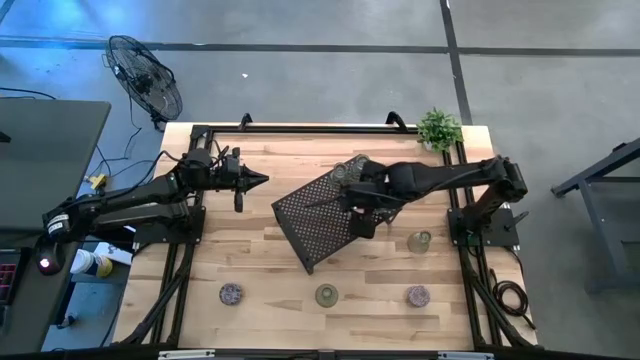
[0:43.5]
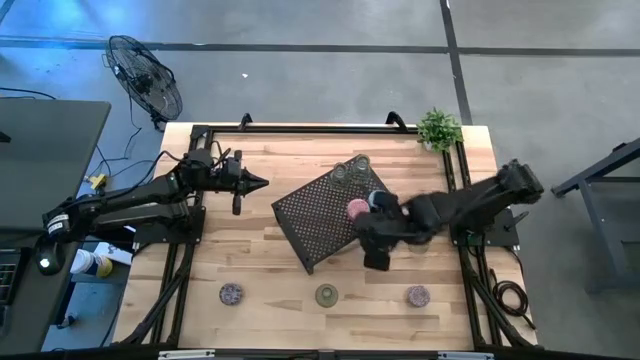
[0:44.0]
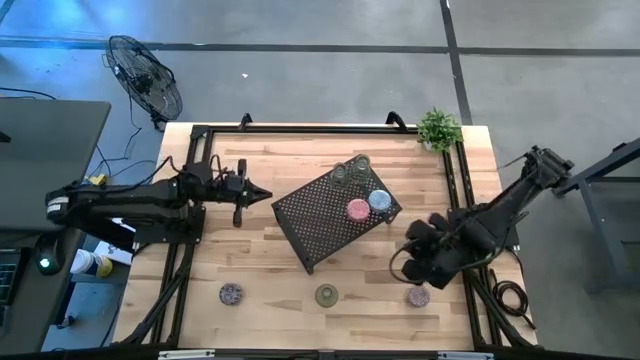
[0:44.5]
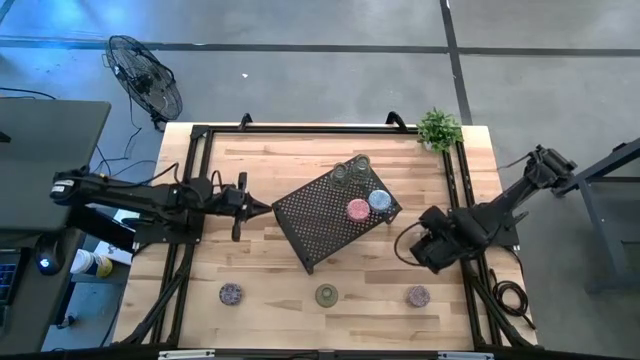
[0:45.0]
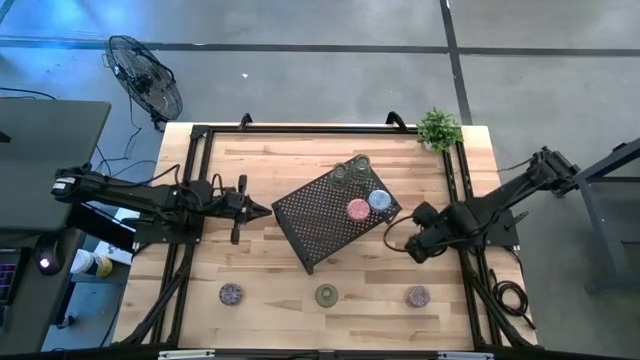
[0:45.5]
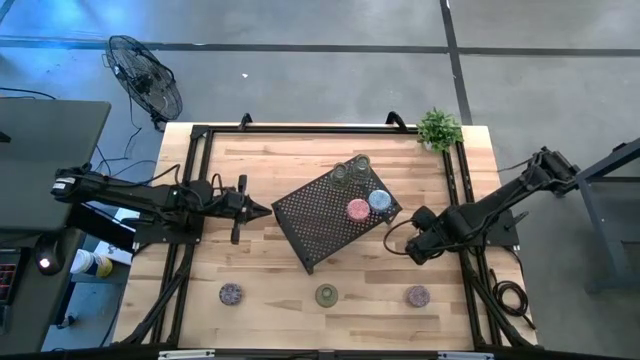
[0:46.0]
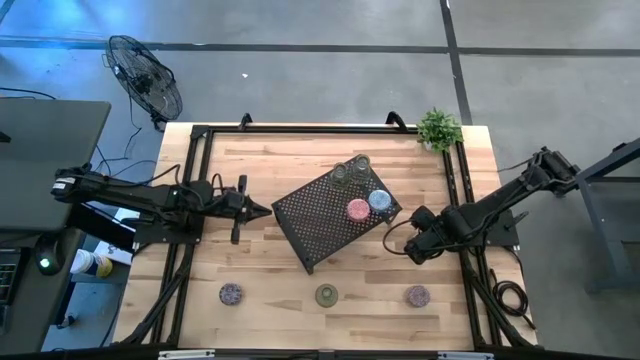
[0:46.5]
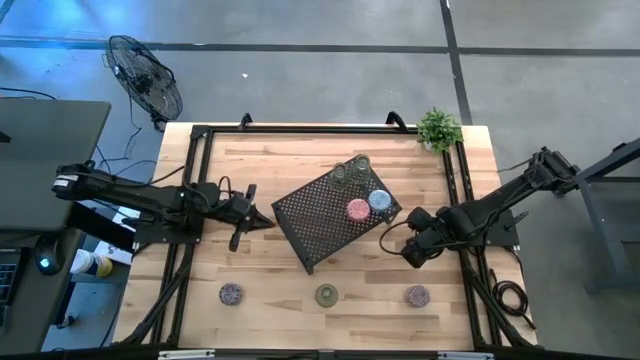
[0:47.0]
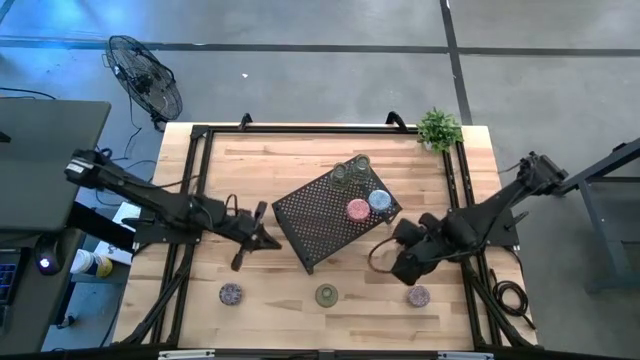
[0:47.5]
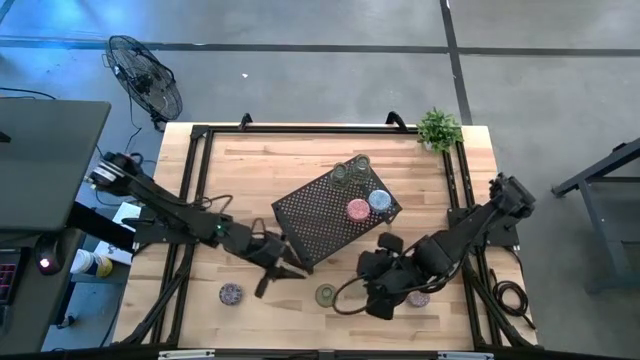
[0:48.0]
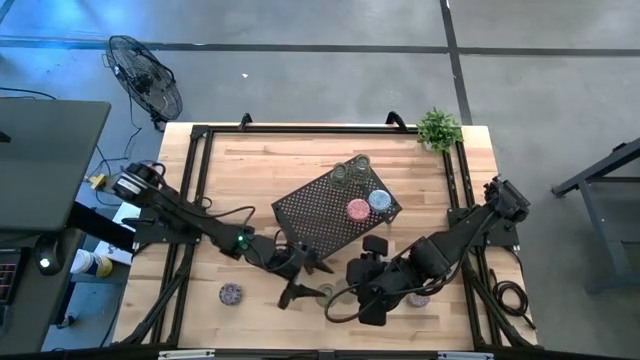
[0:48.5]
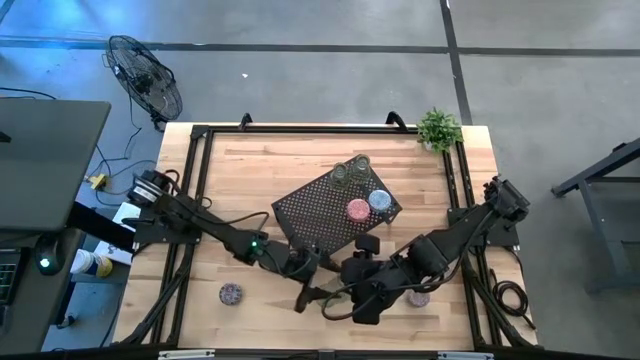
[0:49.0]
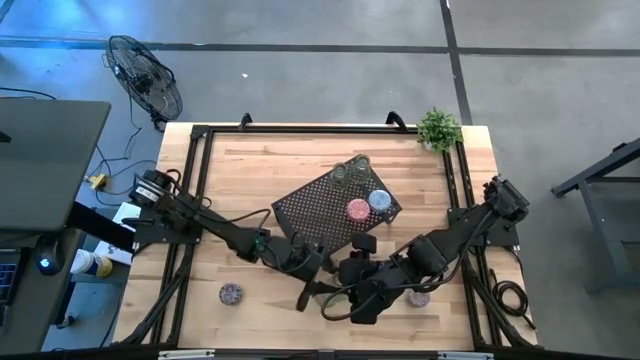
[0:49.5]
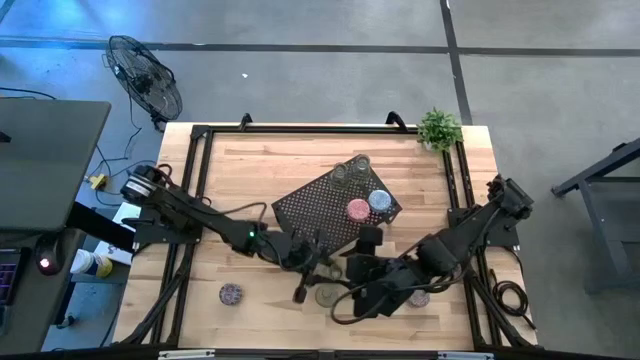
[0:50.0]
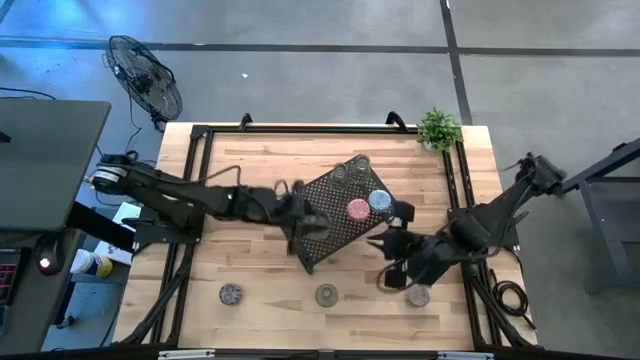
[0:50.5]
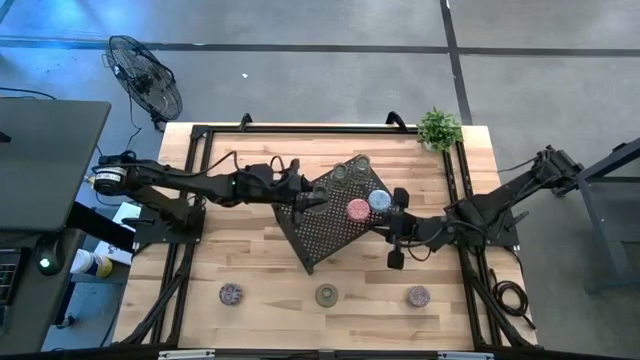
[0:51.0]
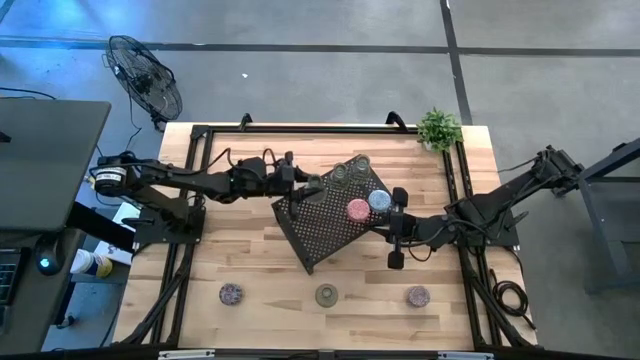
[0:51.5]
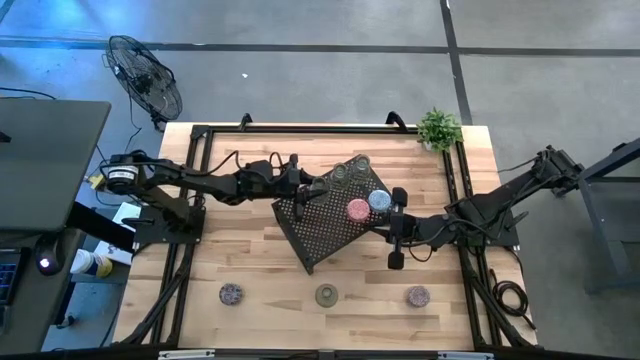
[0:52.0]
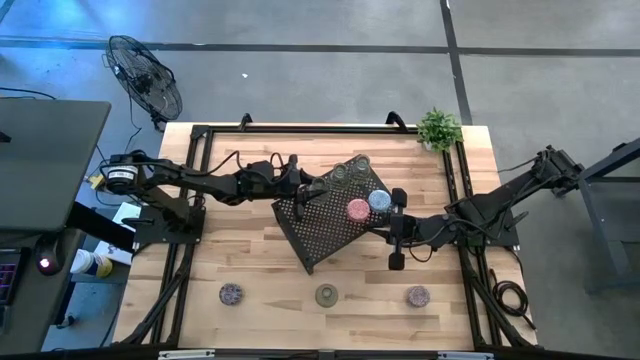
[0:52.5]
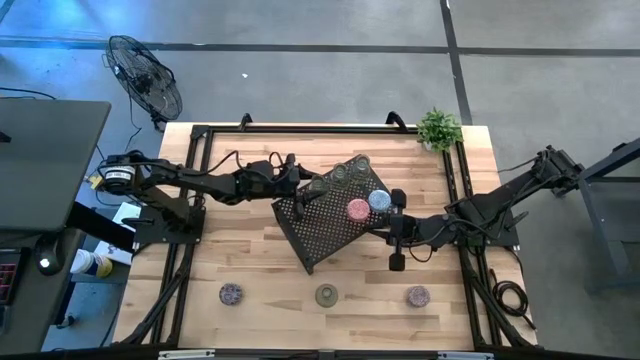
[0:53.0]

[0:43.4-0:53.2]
Task: Pick & Place candle stick holders
Put the top green glass candle holder on the shelf

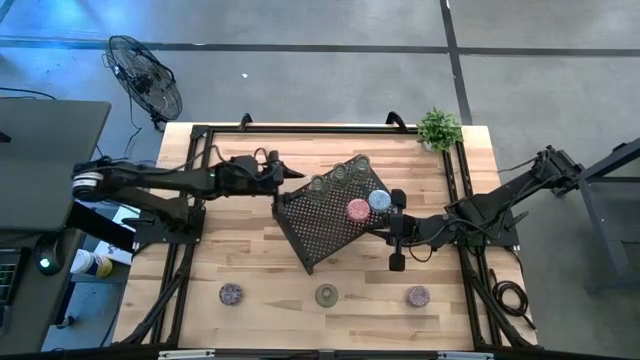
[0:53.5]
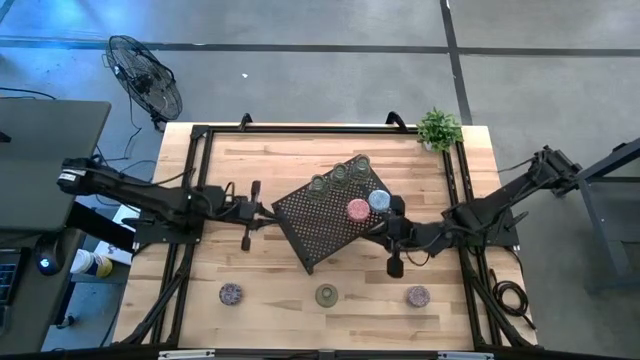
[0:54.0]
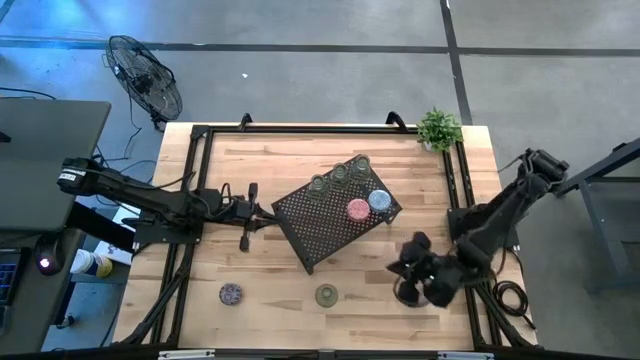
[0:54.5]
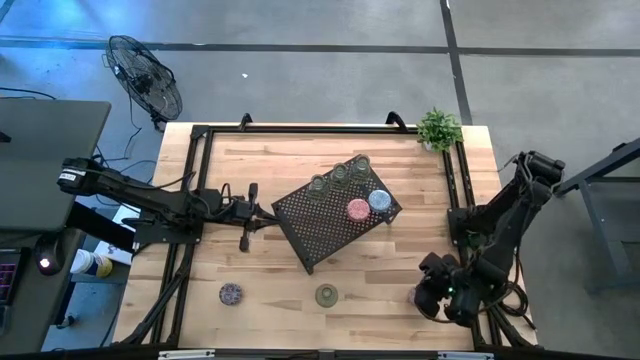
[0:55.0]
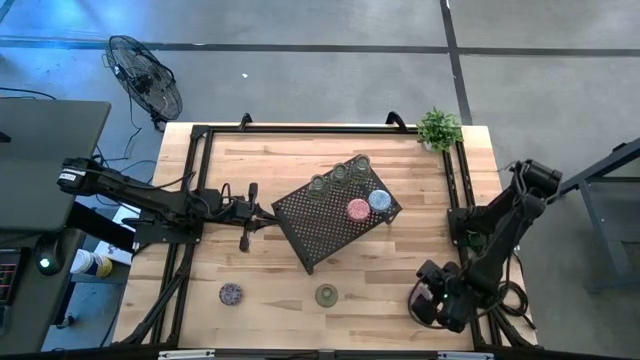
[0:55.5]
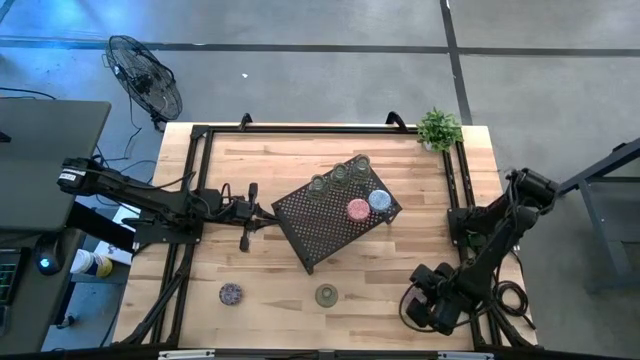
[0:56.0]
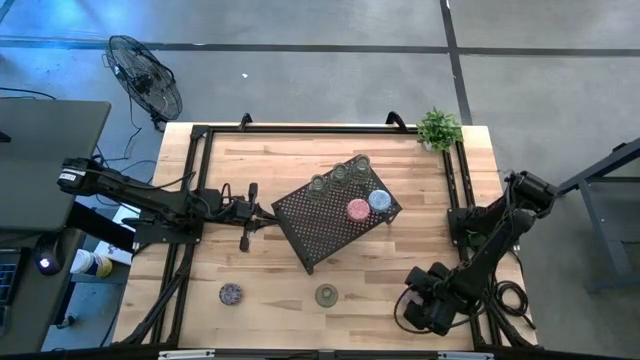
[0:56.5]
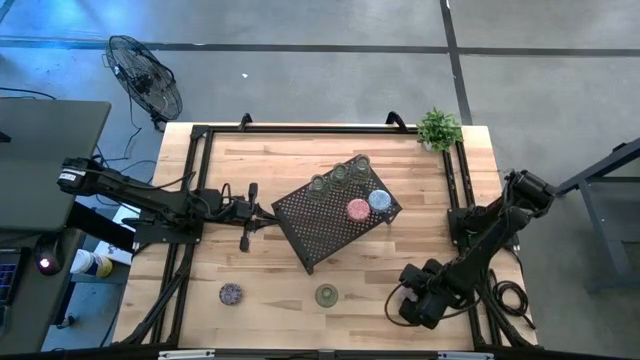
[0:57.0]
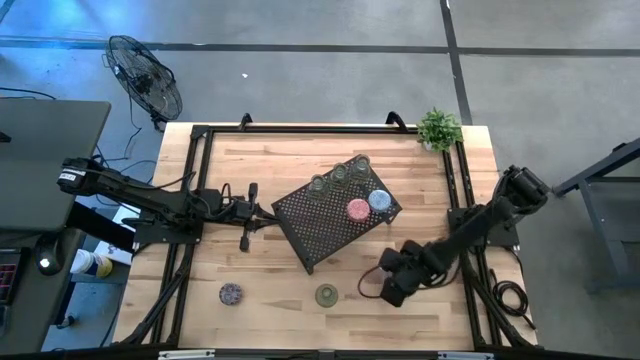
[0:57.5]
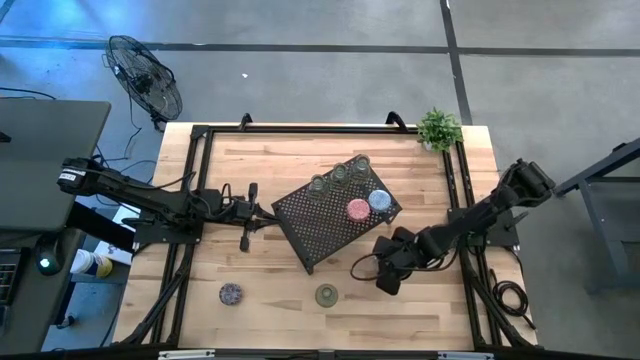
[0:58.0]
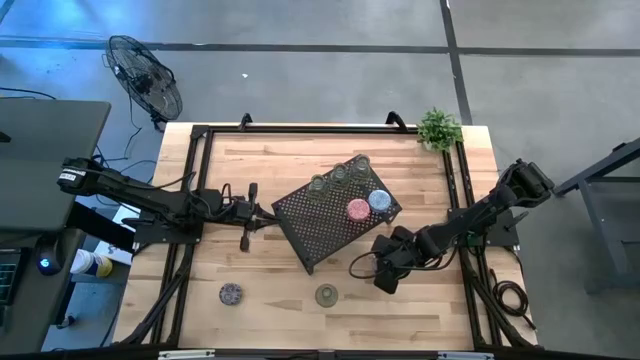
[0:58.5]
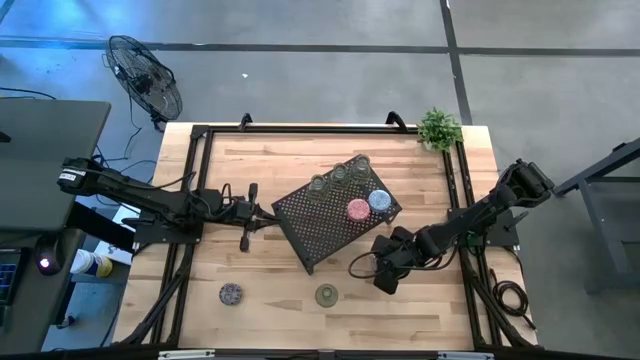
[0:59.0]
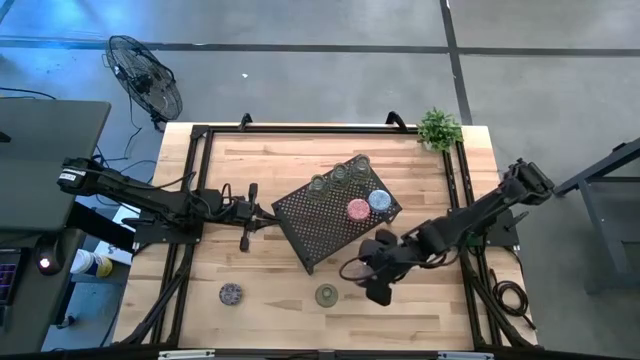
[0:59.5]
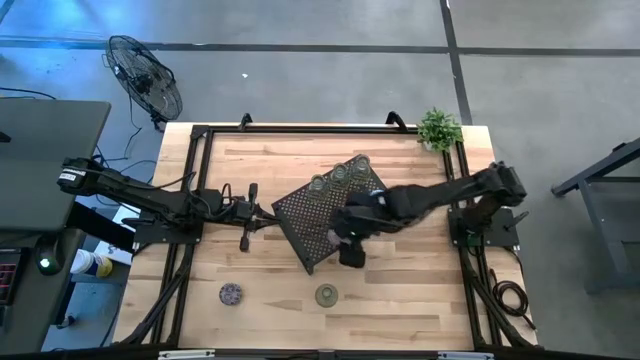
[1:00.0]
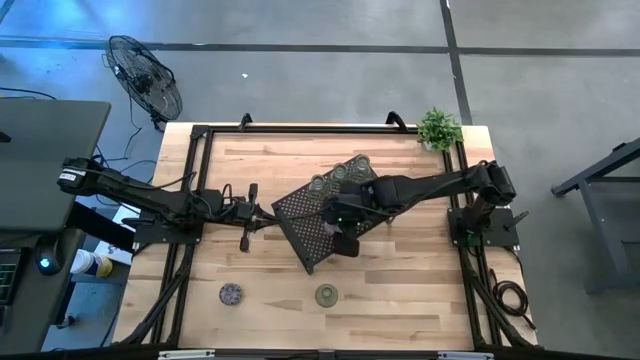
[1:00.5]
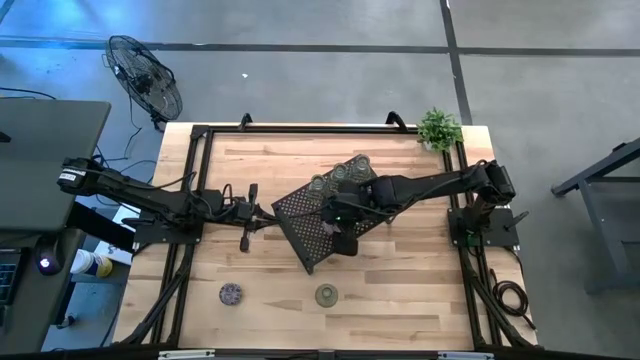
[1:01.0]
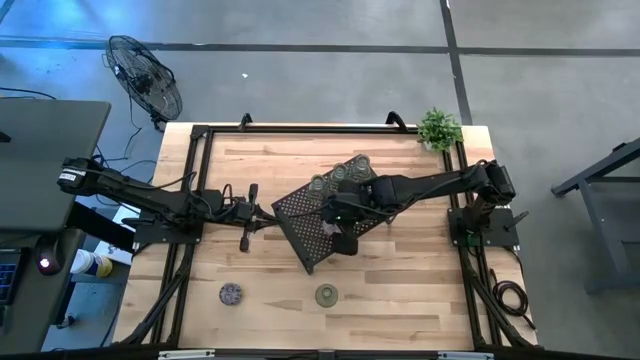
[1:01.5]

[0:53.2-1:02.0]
Put the red scented candle on the shelf

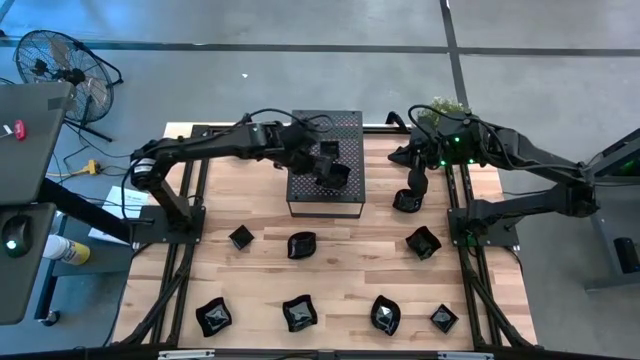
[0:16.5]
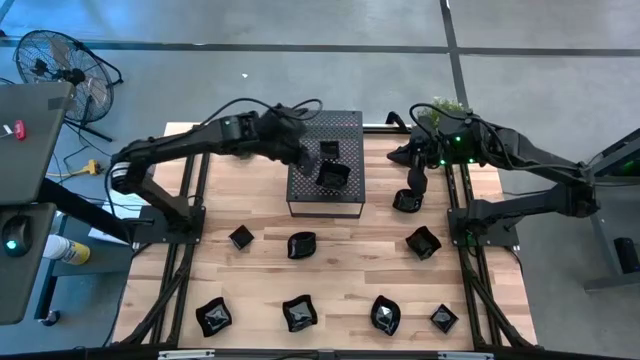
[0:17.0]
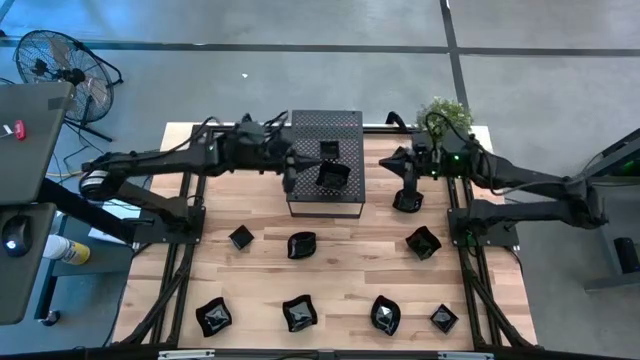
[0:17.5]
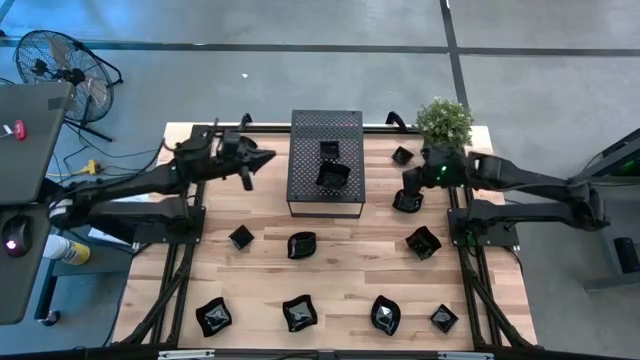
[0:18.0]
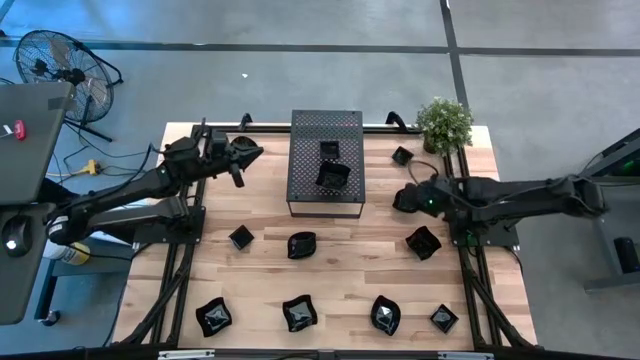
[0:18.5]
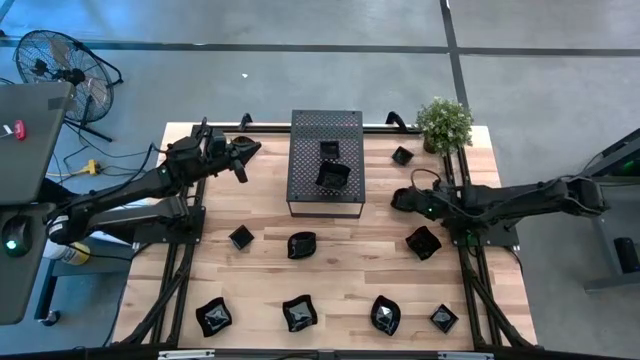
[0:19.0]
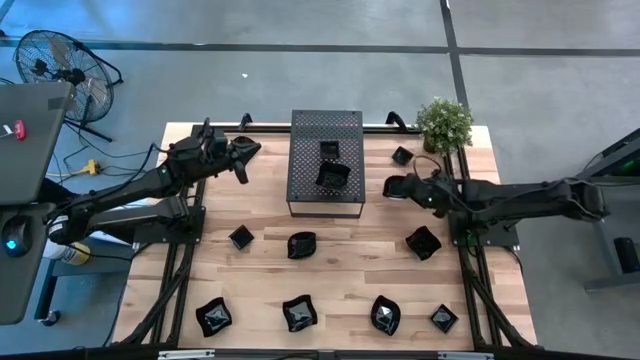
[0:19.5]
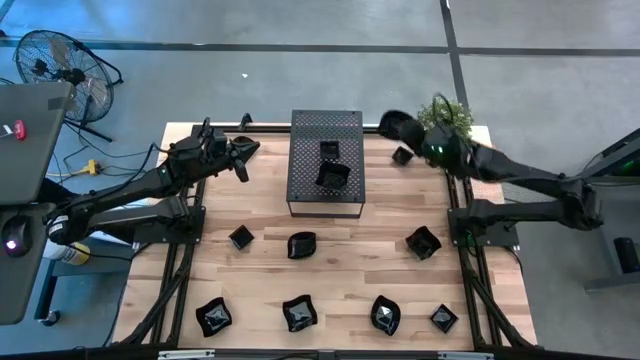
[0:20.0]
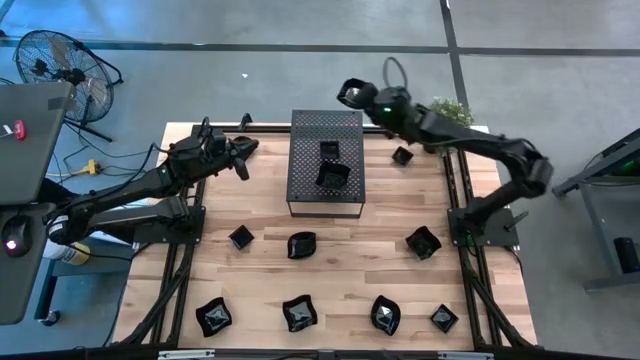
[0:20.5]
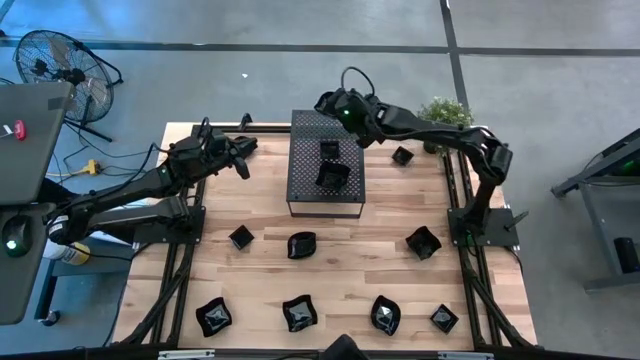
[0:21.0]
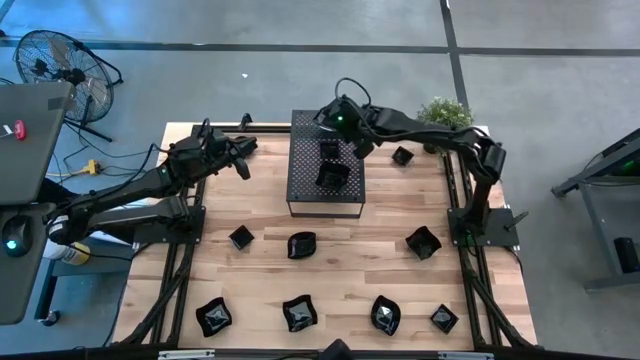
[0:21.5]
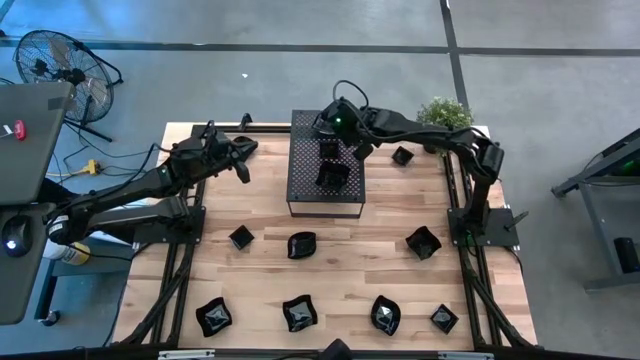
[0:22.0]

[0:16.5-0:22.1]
Task: Pick & Place Mini shaped plates
Put the leaf shaped plate on the shelf
